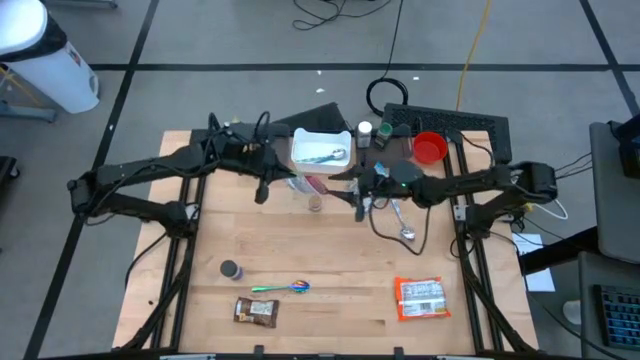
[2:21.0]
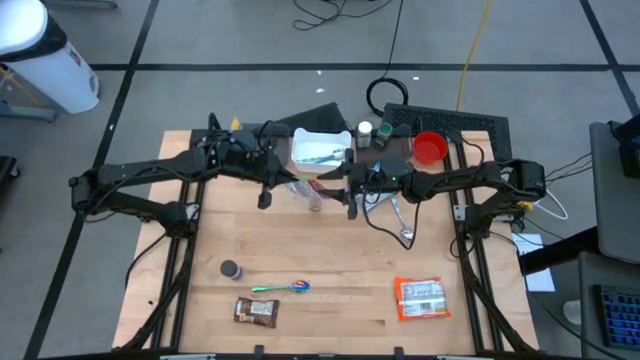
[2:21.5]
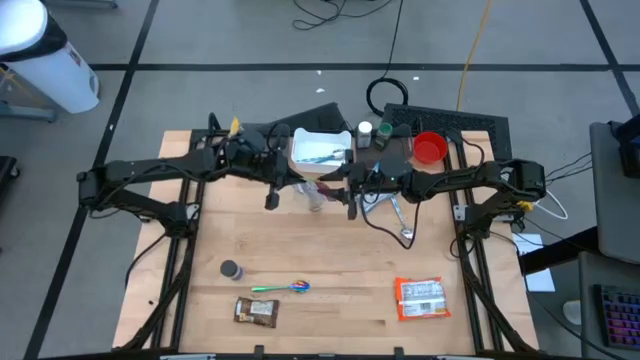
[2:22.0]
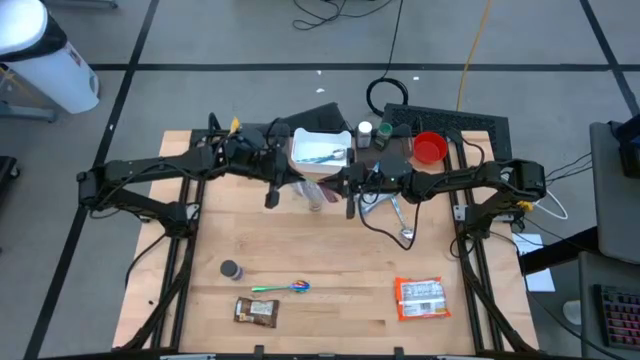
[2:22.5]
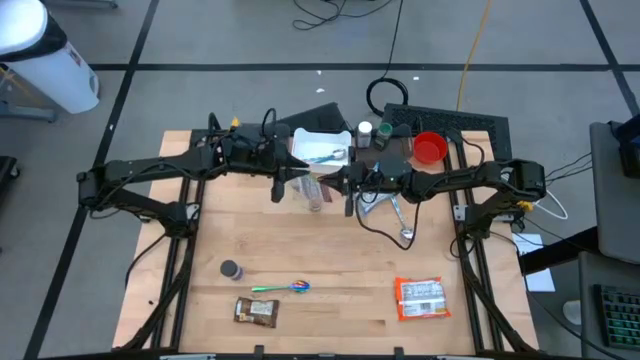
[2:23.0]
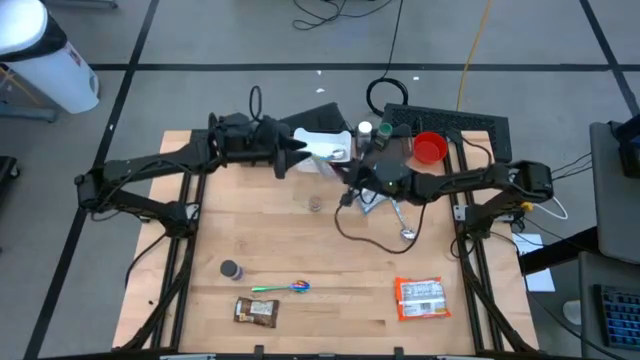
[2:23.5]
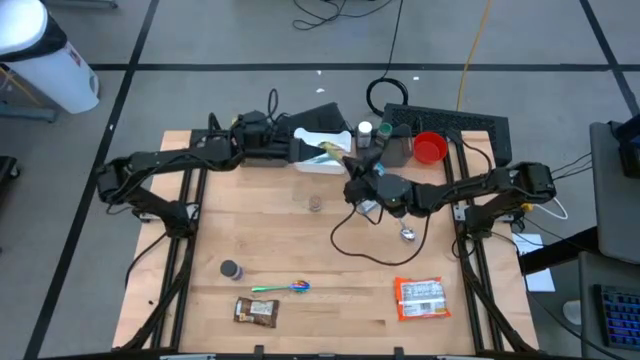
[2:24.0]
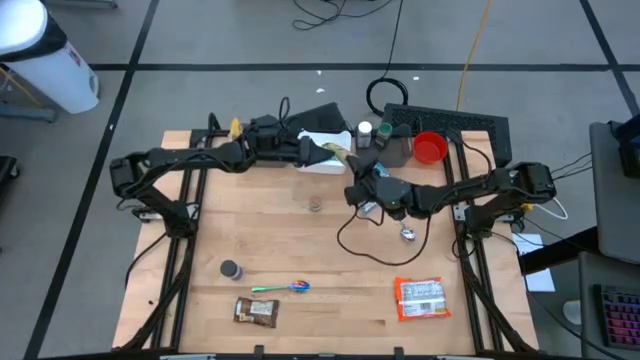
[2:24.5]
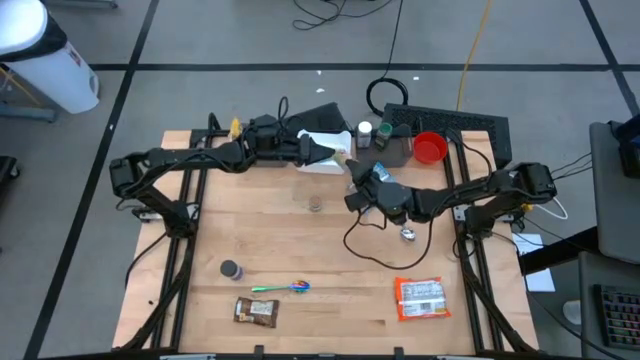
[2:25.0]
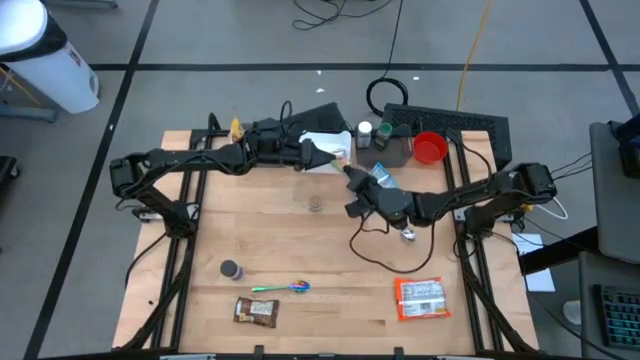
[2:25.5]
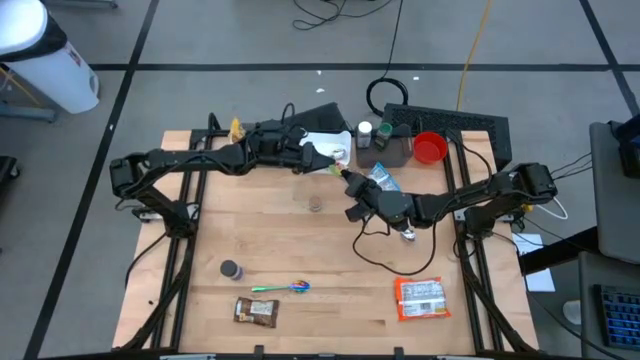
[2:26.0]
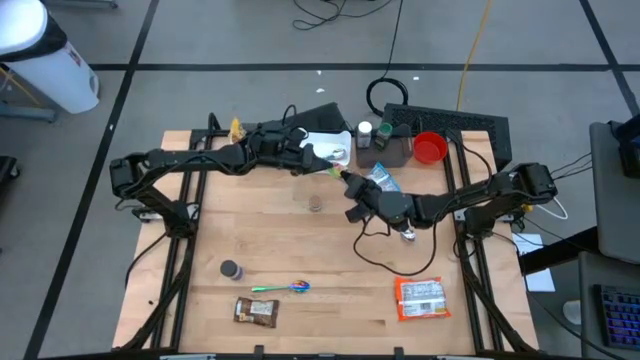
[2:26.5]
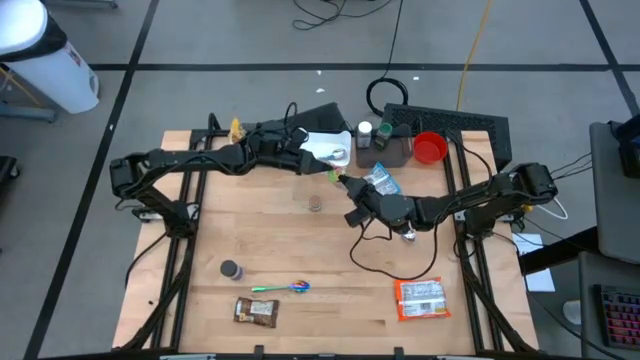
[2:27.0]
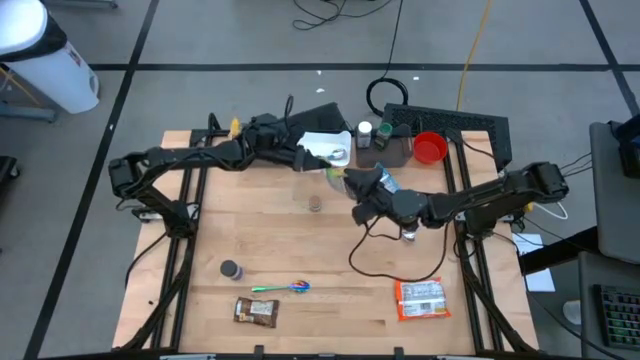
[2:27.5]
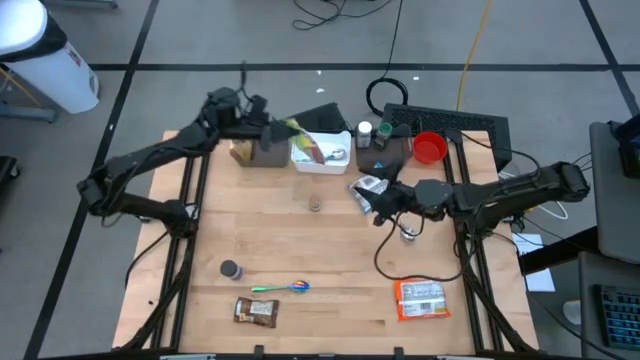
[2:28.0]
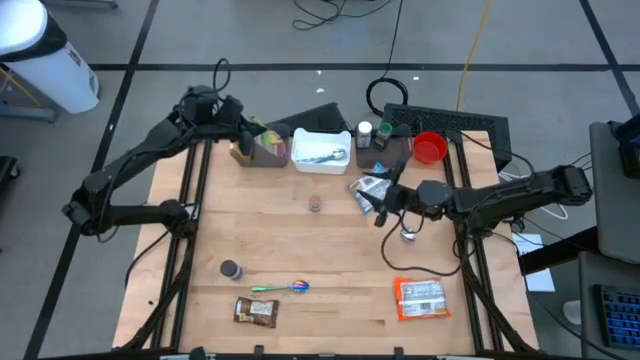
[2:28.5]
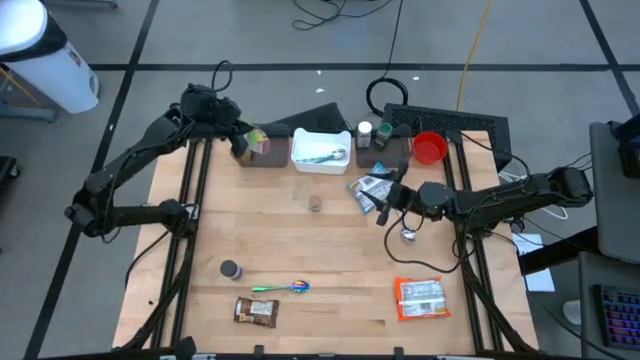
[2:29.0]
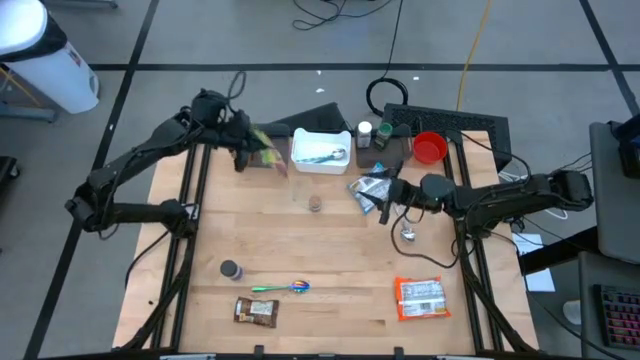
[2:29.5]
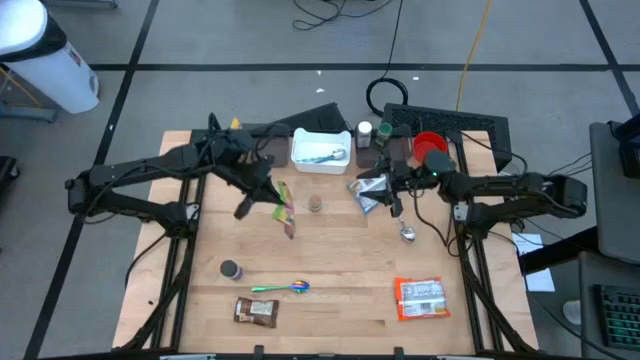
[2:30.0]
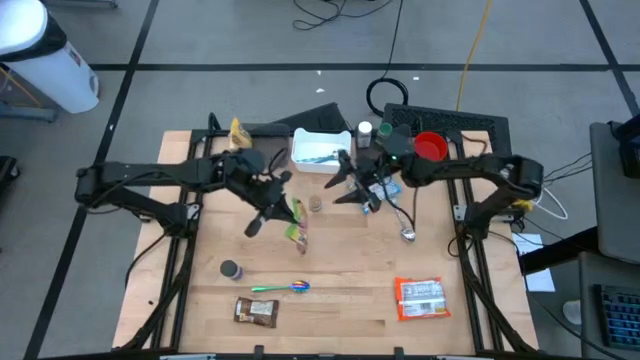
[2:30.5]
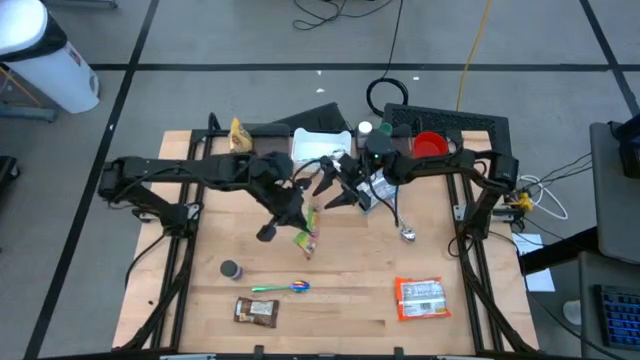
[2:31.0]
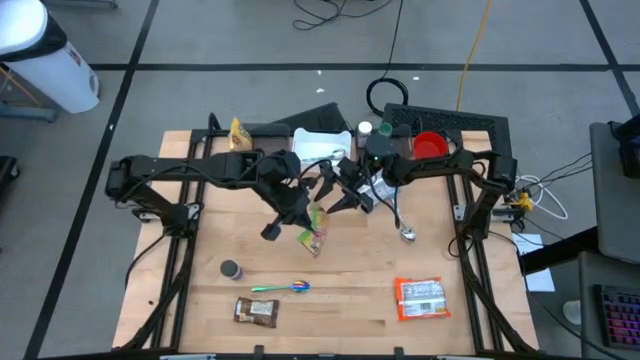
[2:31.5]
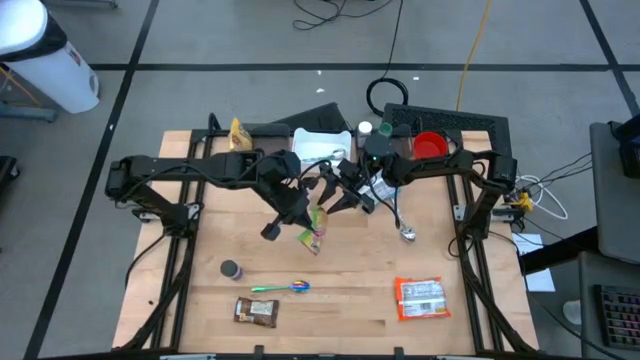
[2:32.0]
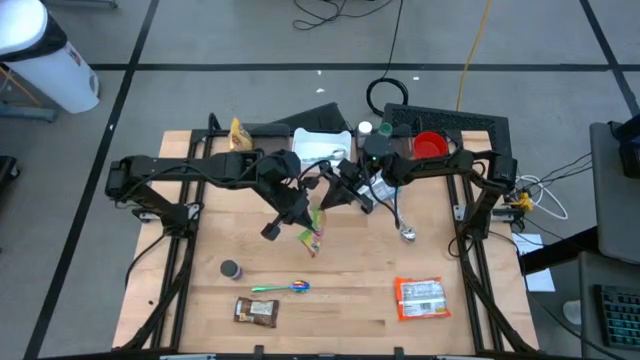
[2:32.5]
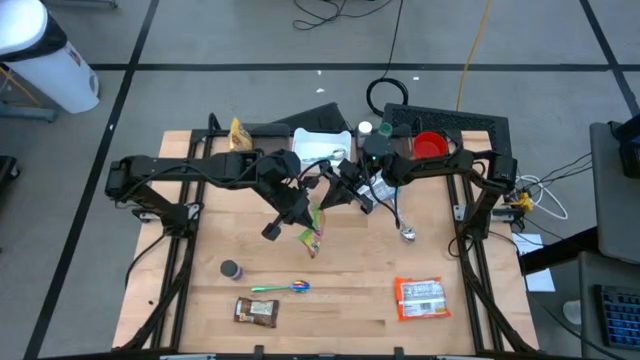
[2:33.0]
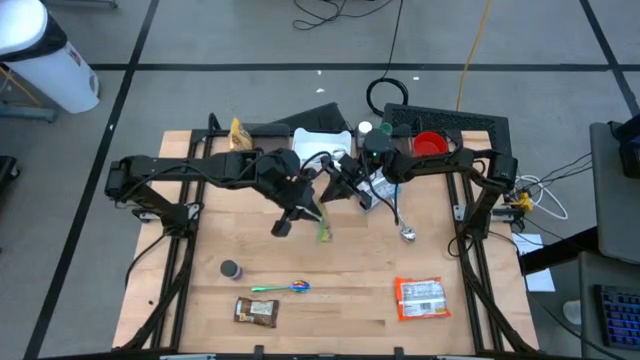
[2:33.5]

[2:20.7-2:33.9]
Task: Pick & Place Food Item
Put the green noodle pack into the left black bin

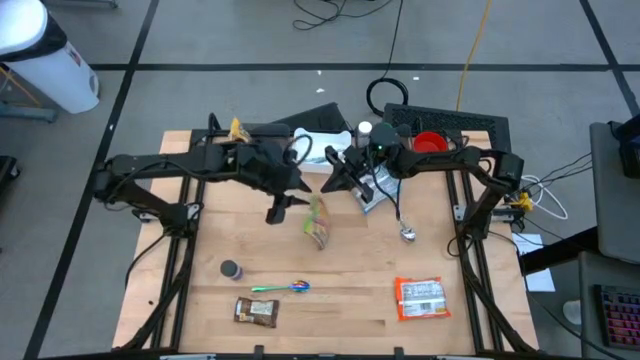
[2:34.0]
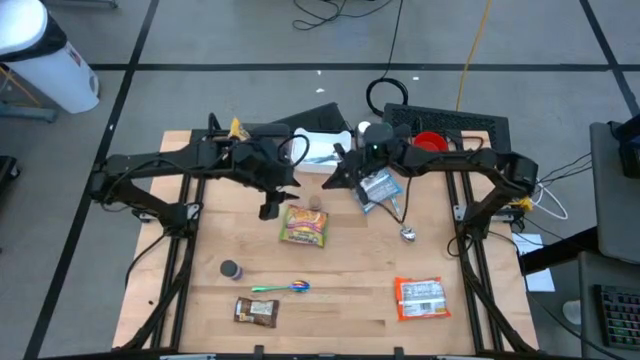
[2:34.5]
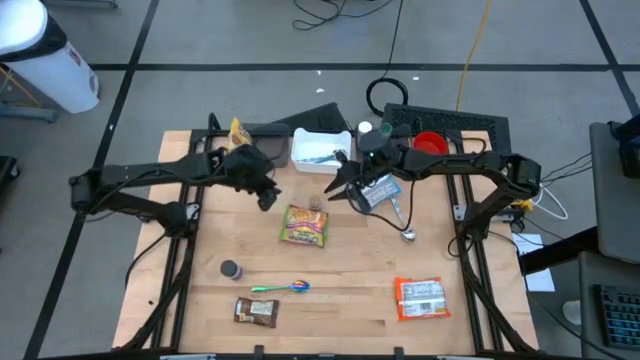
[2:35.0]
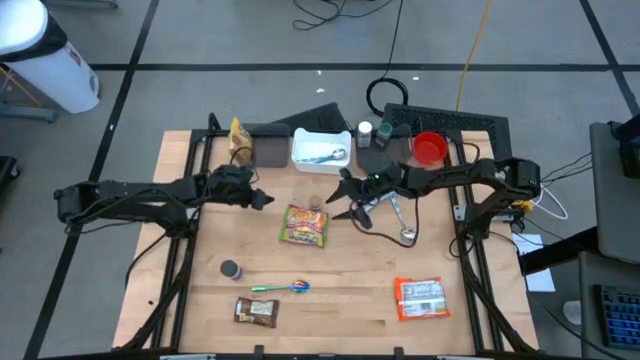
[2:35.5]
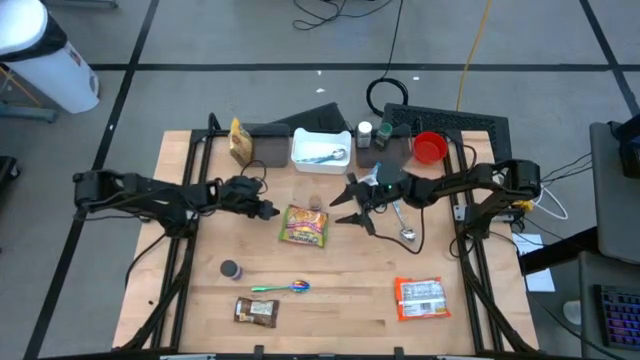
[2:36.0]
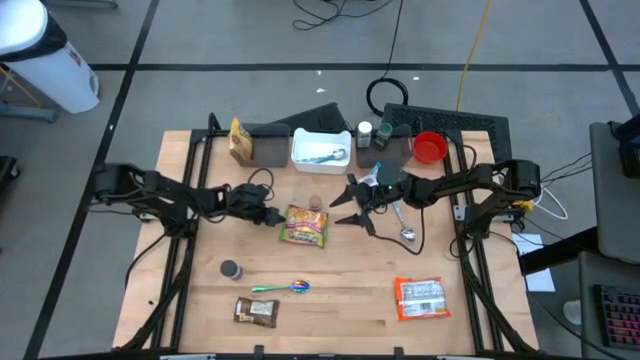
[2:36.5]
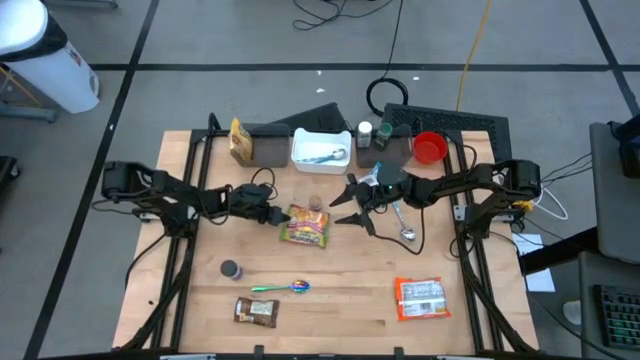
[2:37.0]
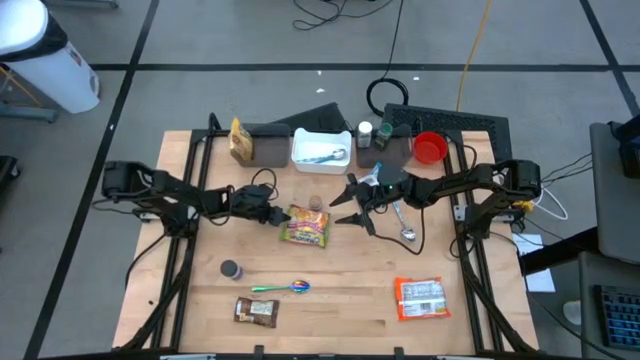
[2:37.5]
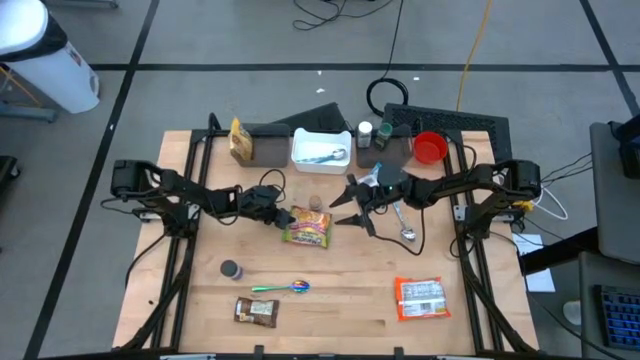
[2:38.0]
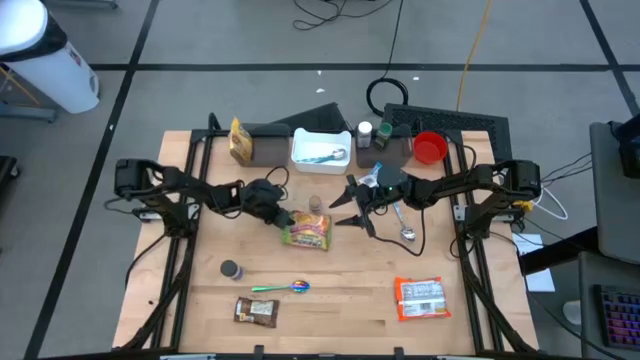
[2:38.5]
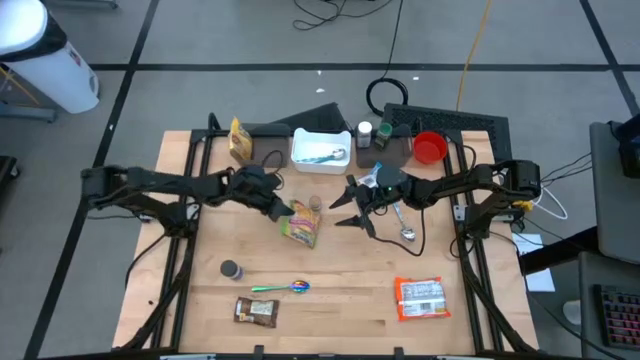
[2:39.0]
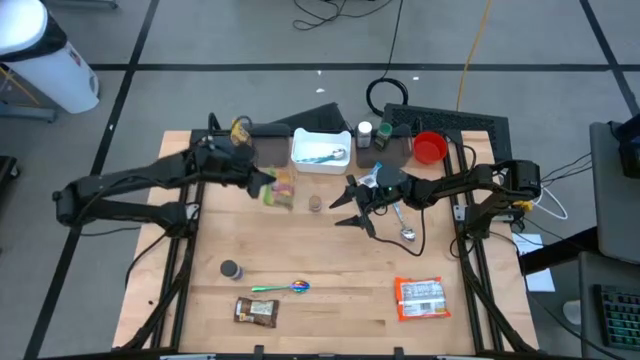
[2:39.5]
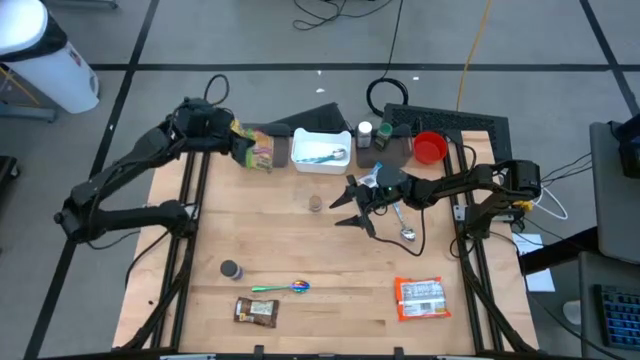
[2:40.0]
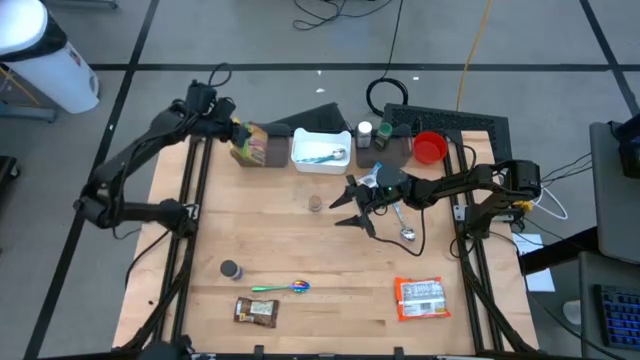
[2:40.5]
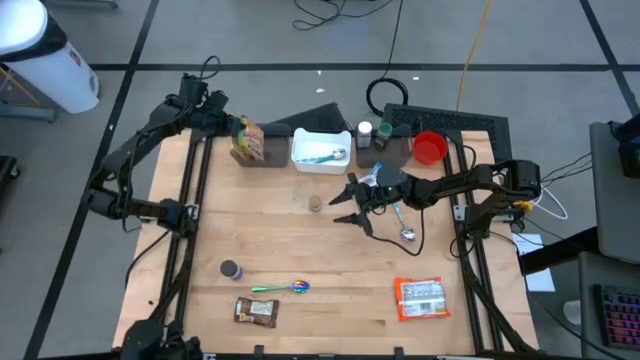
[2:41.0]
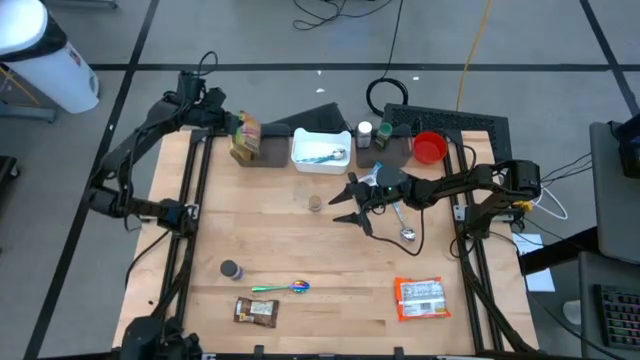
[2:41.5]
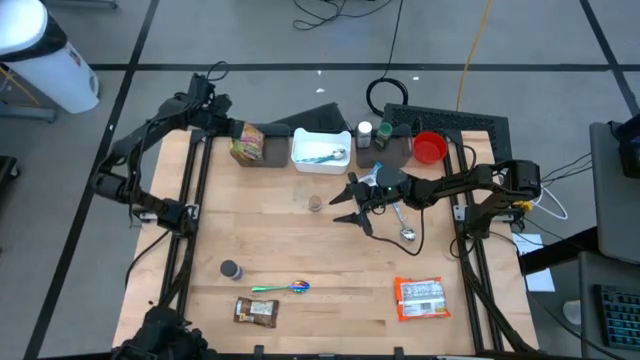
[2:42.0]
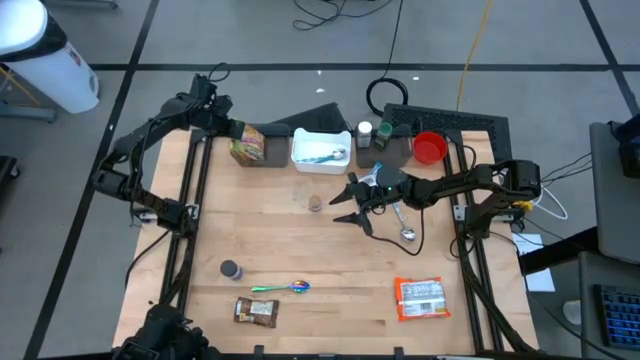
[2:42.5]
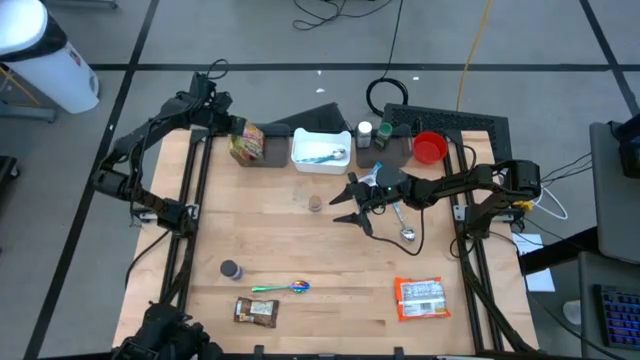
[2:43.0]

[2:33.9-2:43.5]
Put the green noodle pack into the left black bin
